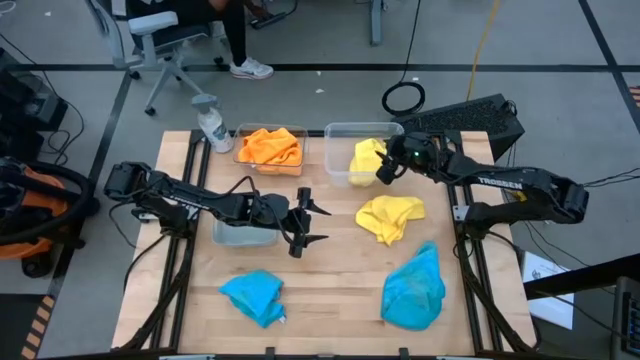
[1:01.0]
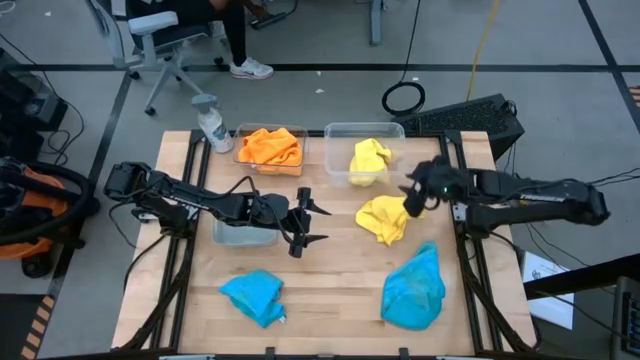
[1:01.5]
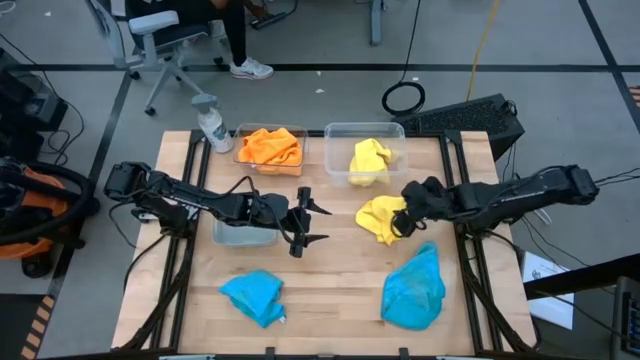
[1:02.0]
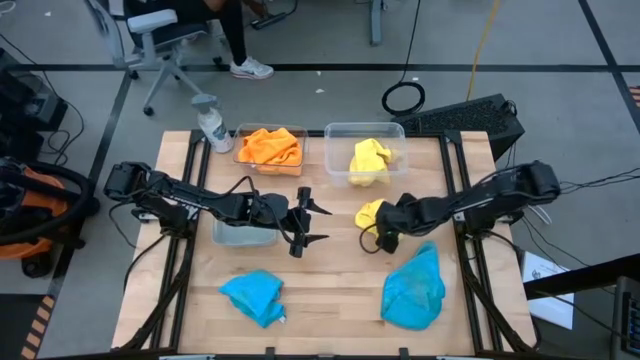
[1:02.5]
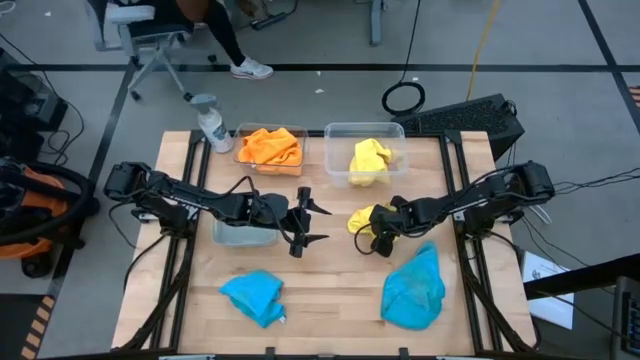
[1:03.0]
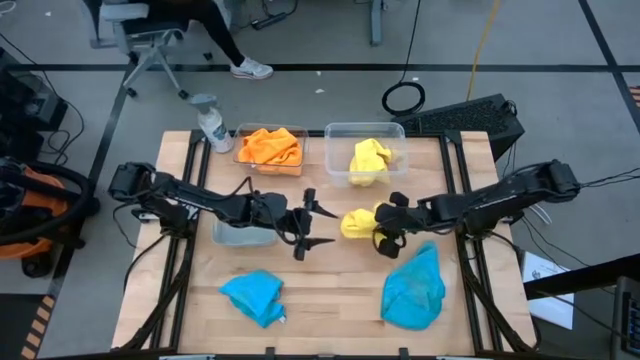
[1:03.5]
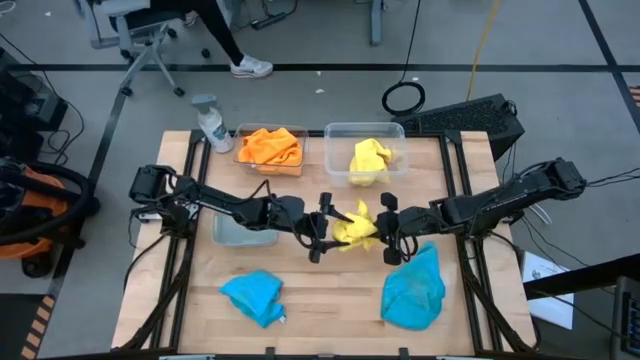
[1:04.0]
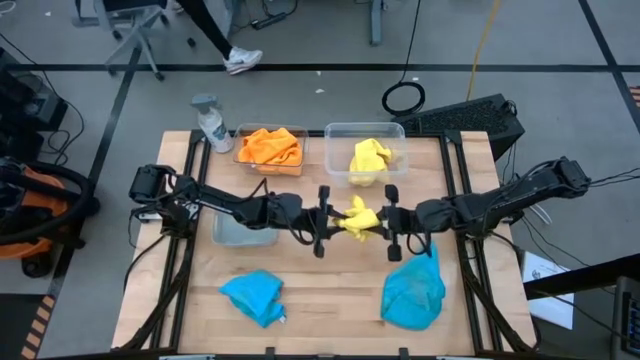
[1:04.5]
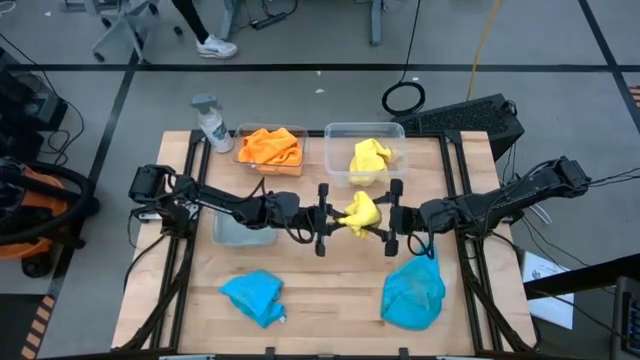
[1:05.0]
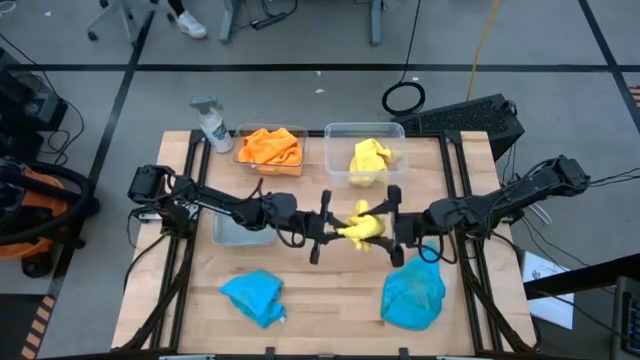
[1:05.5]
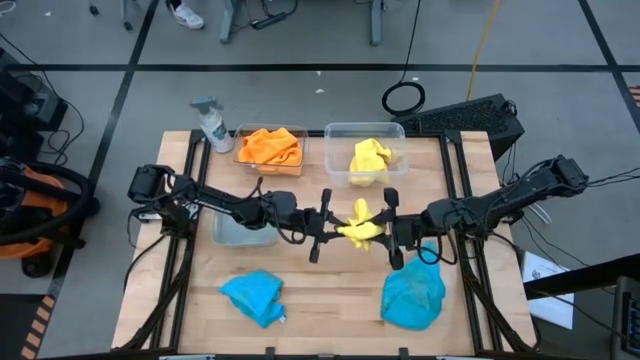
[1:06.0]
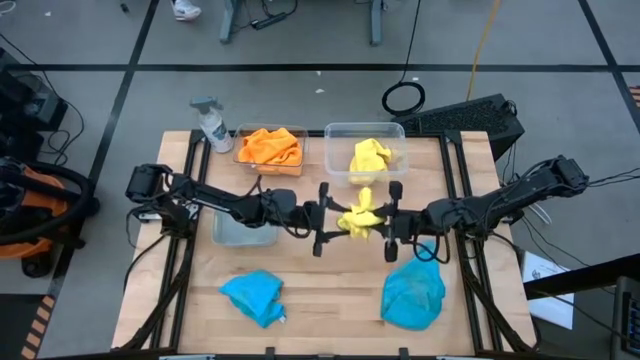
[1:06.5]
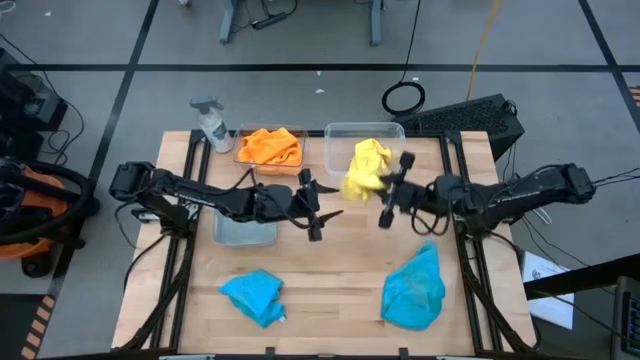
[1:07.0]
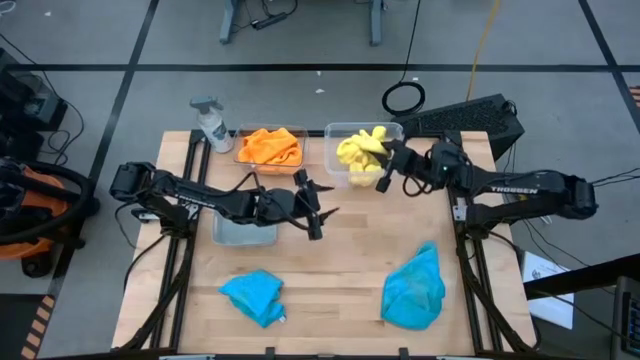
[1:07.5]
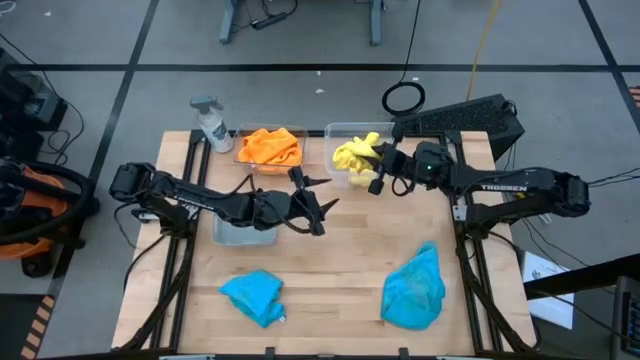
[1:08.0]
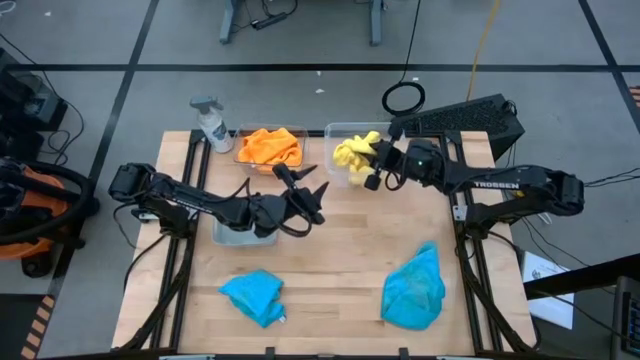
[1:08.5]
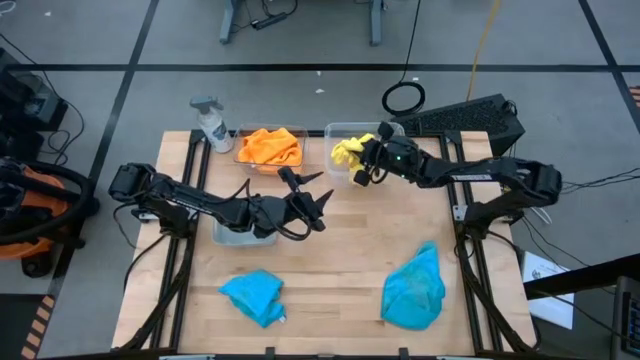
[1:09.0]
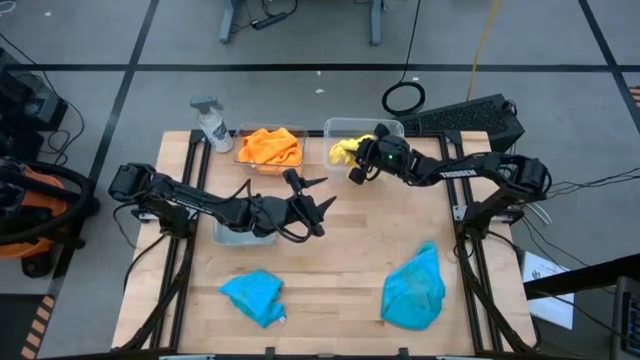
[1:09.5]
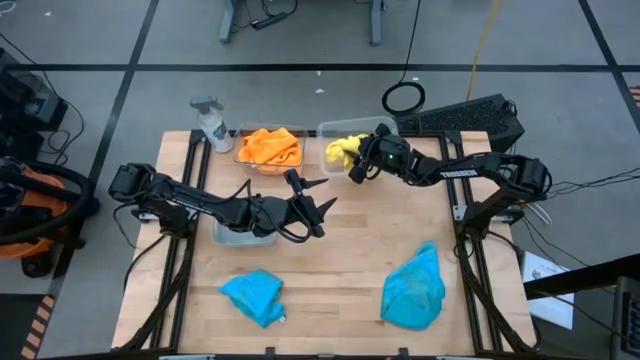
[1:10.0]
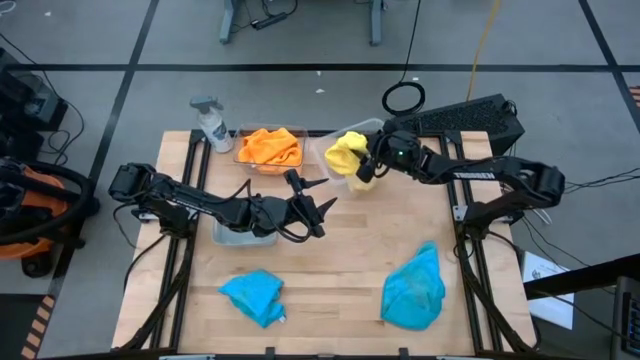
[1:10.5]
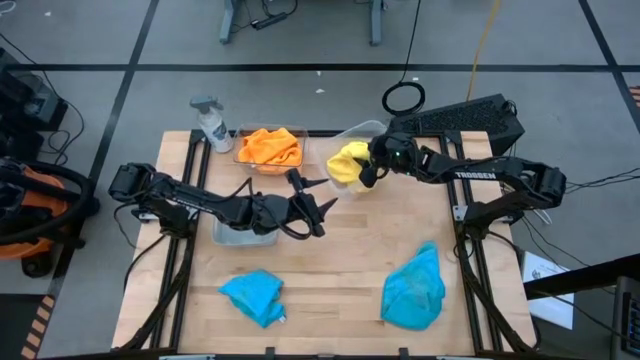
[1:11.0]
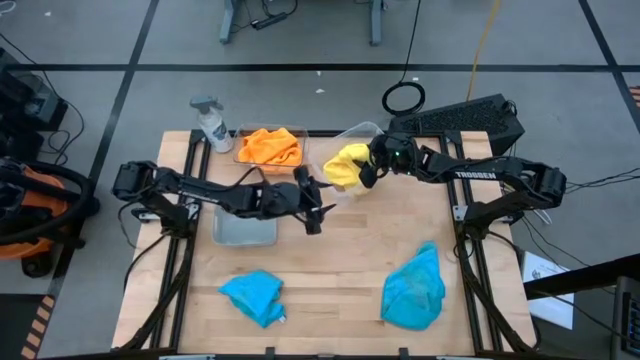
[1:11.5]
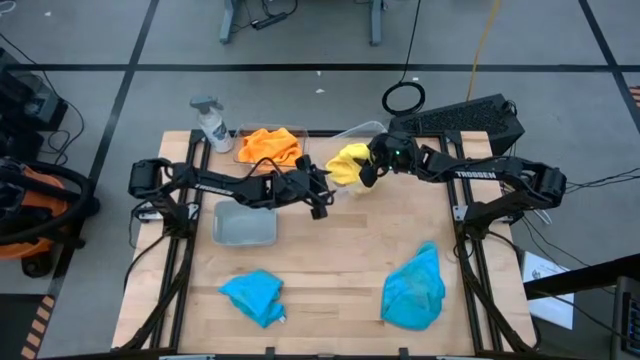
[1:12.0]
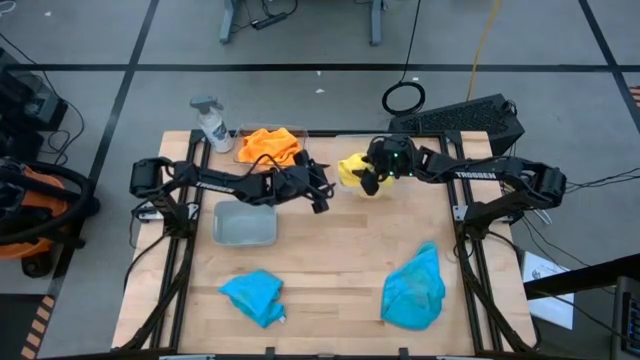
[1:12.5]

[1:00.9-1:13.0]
Task: Sort microfiber towel by color & place in baskets
Put the right yellow towel into the right transparent bin

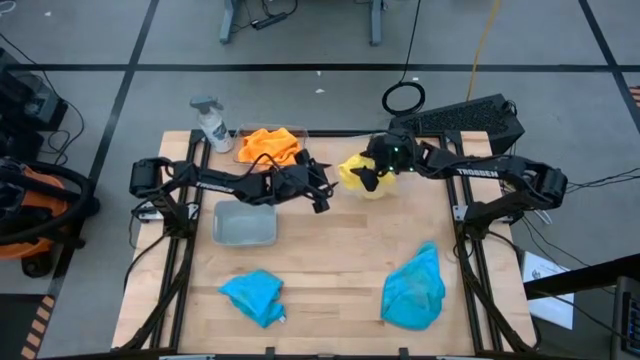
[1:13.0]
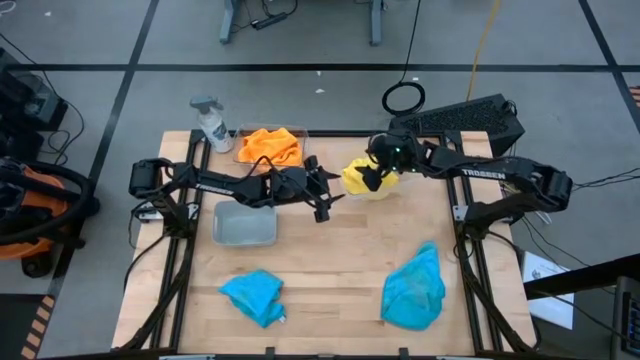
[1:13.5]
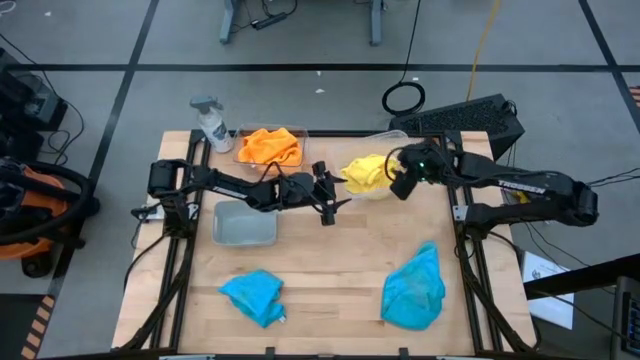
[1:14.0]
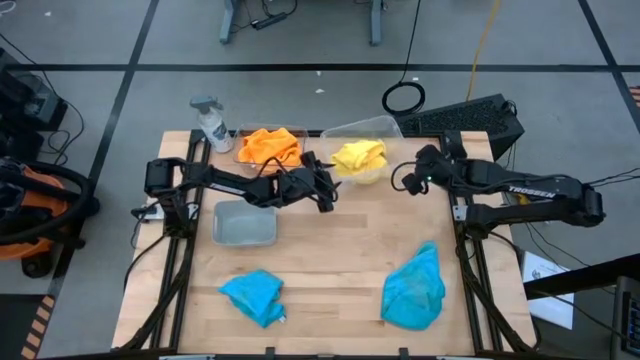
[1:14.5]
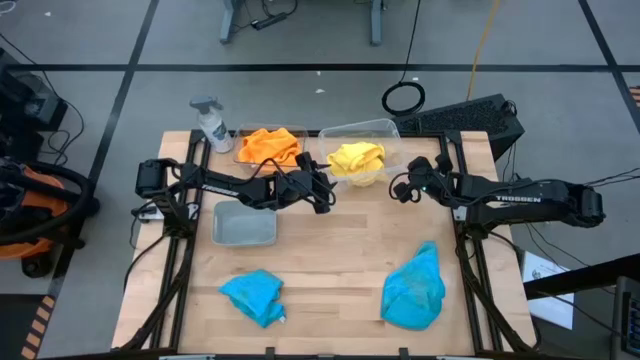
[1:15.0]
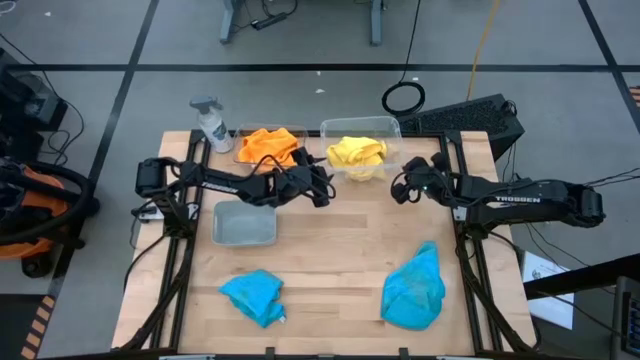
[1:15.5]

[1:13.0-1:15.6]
Adjust the right transparent bin

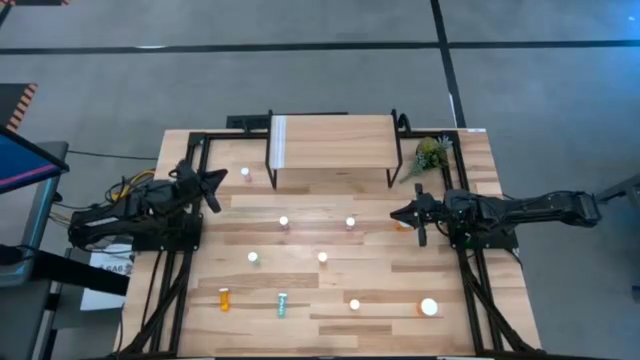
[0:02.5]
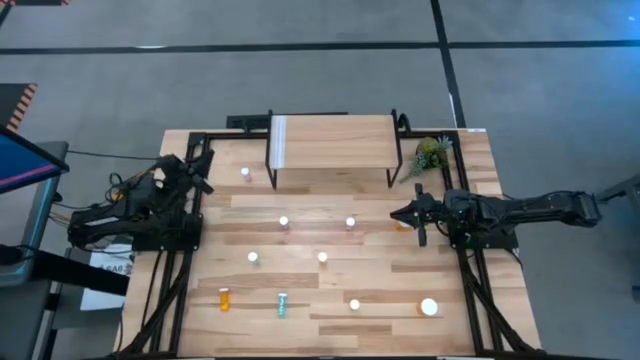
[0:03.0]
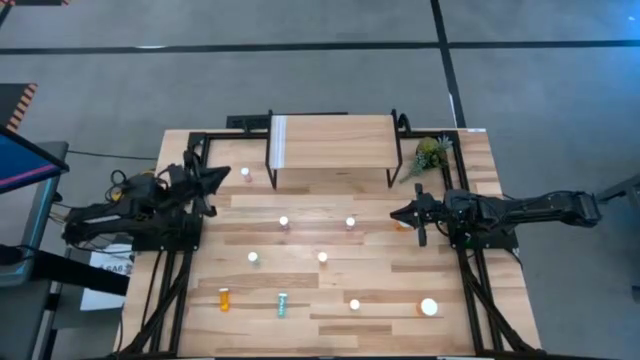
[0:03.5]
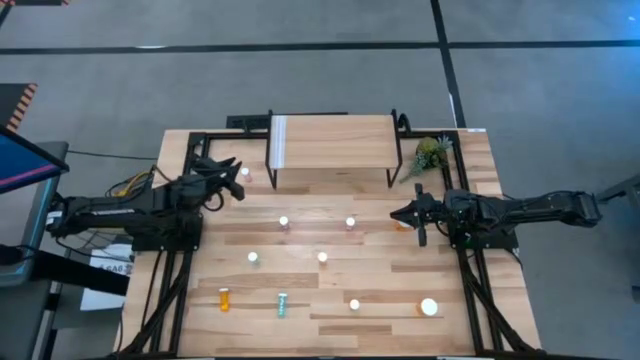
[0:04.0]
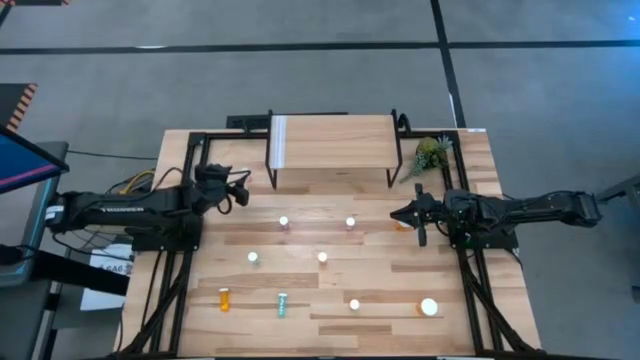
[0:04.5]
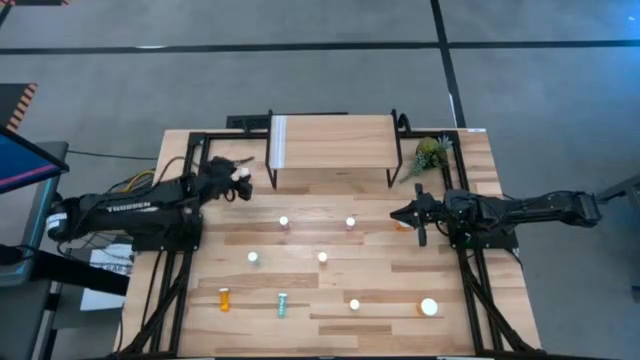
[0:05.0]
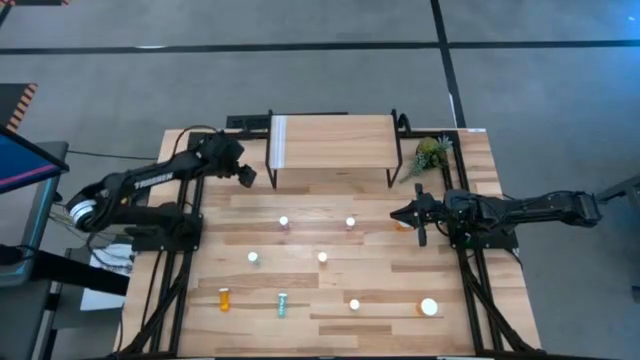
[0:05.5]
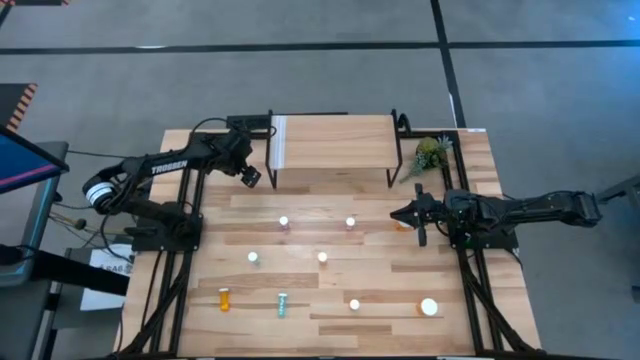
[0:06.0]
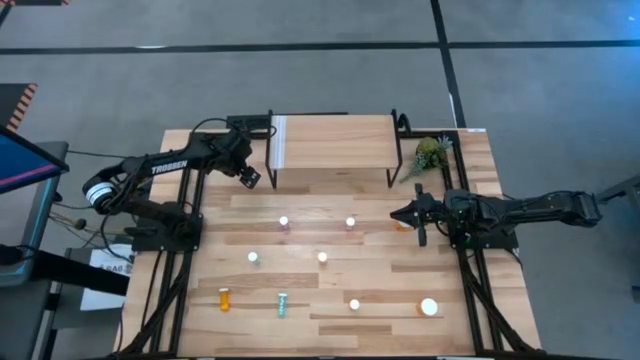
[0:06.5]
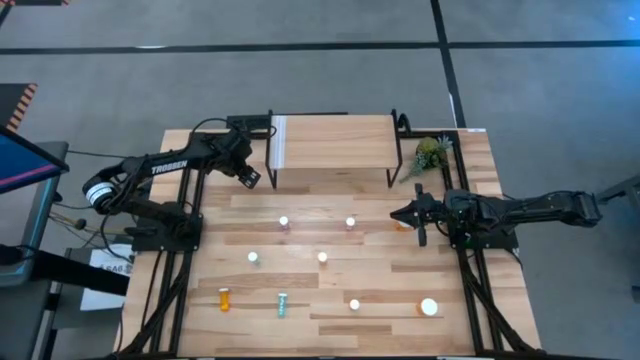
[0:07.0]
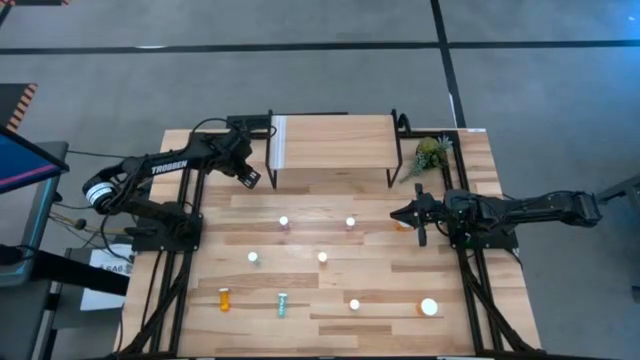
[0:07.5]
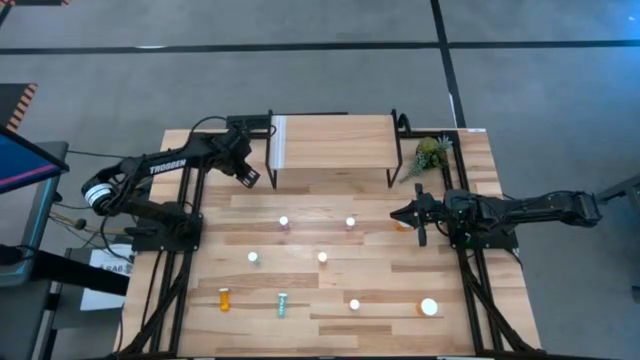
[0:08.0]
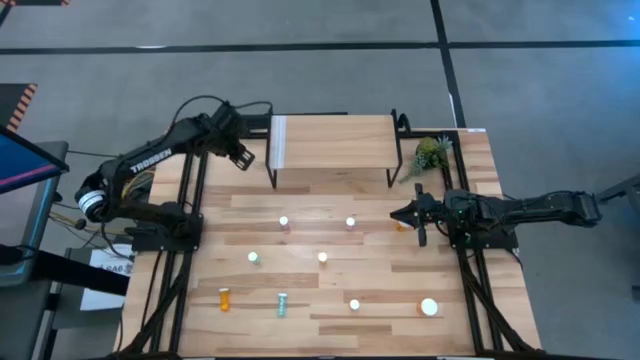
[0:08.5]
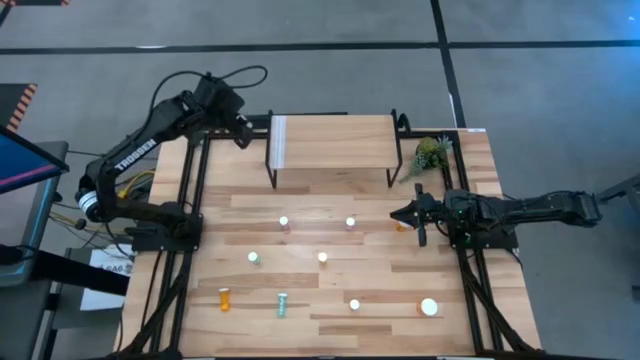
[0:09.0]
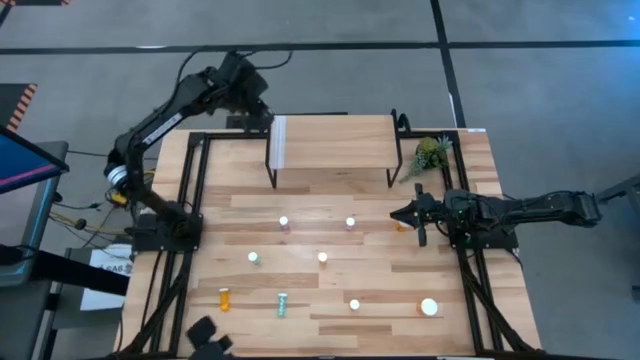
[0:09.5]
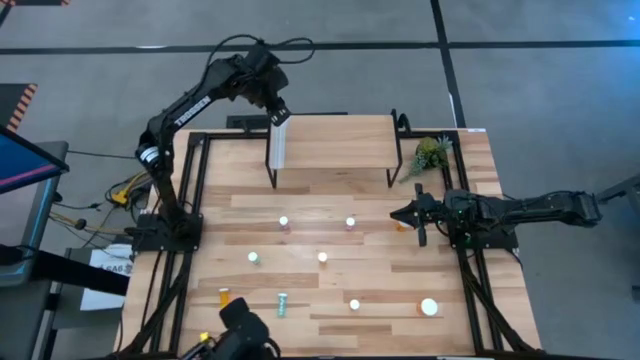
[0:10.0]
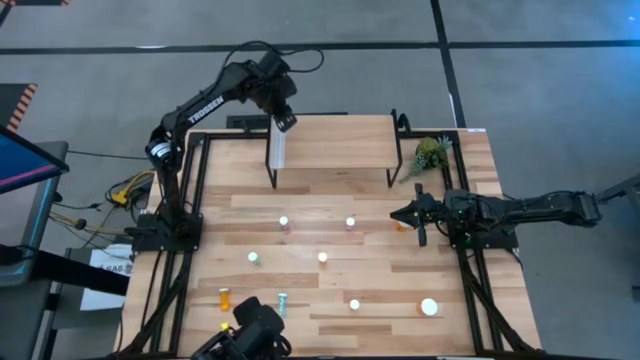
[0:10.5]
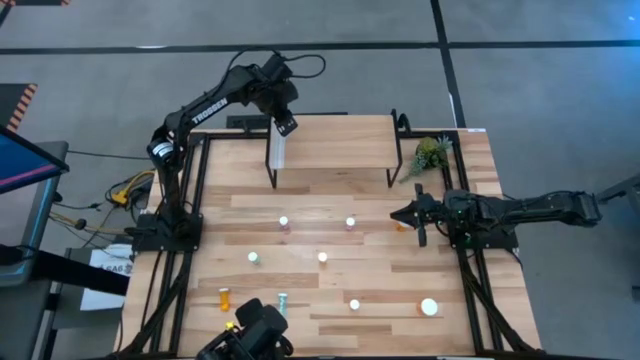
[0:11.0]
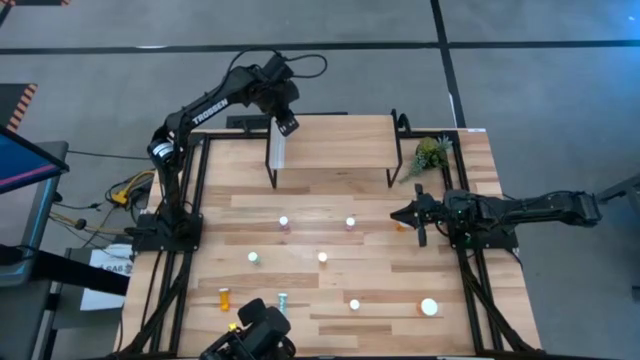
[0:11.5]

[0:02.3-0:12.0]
Task: Pick and place medicine bottles onto shelf by color
Put the top pink pill bottle on the shelf
